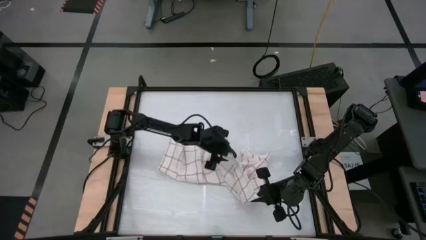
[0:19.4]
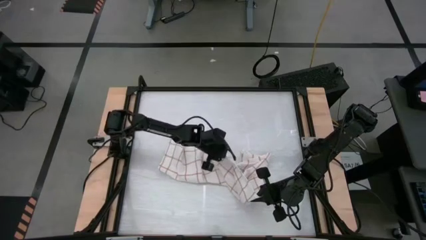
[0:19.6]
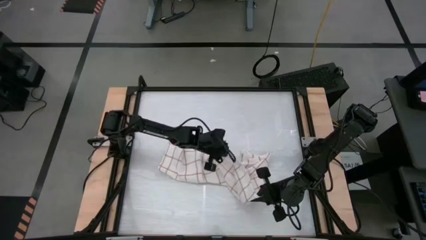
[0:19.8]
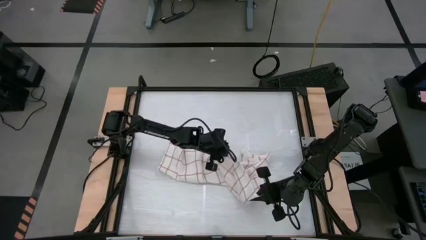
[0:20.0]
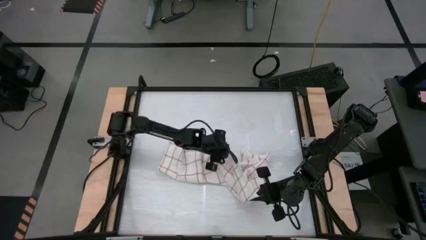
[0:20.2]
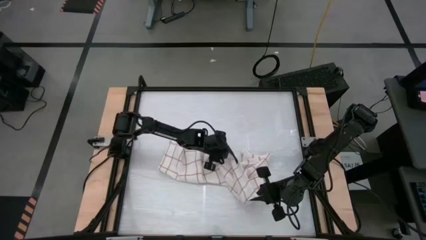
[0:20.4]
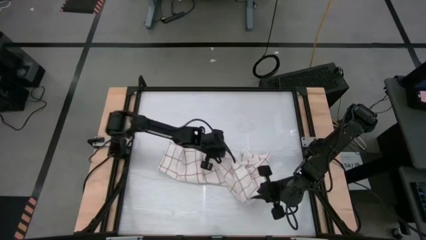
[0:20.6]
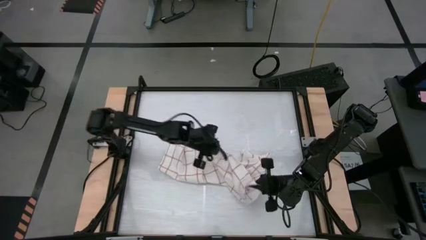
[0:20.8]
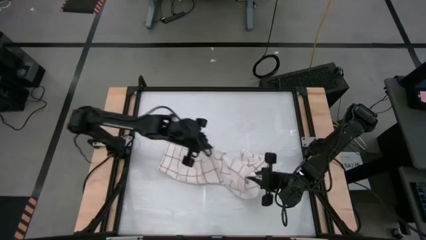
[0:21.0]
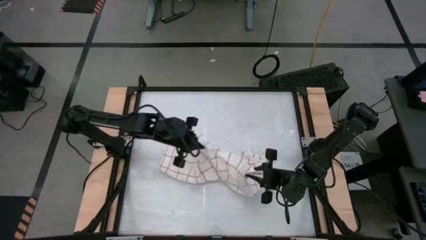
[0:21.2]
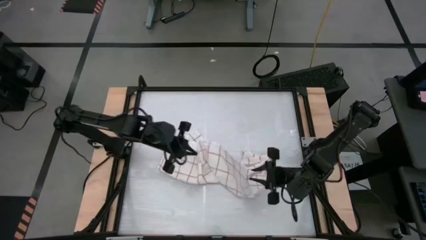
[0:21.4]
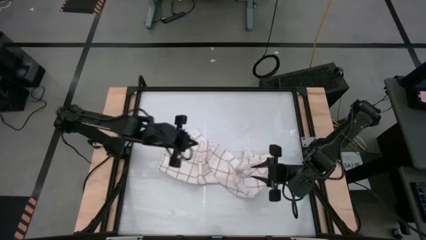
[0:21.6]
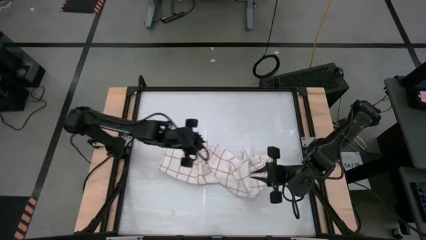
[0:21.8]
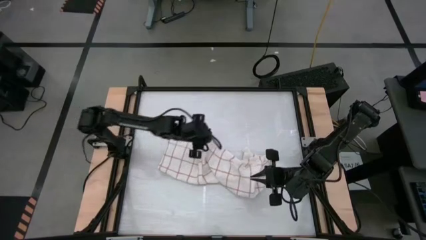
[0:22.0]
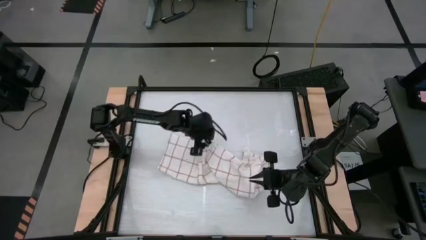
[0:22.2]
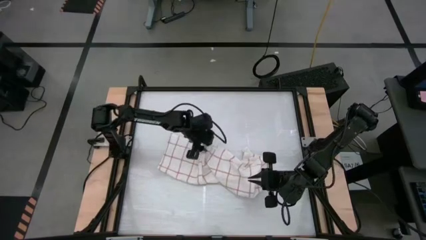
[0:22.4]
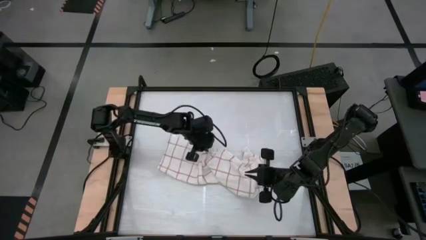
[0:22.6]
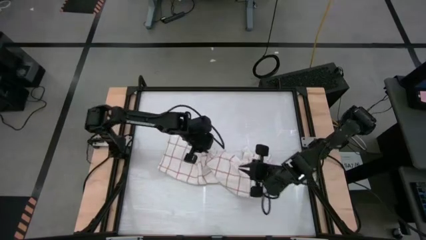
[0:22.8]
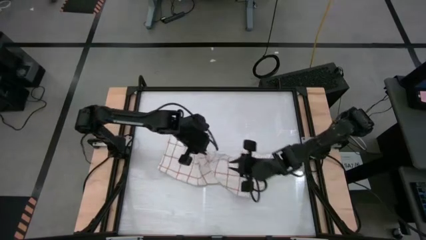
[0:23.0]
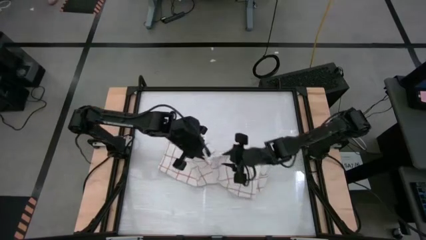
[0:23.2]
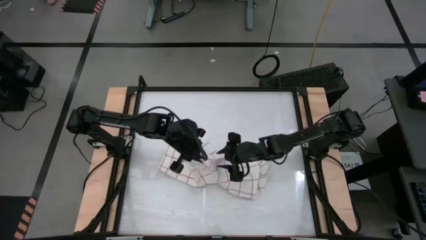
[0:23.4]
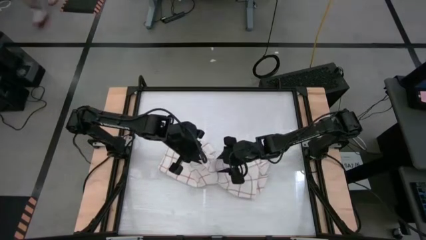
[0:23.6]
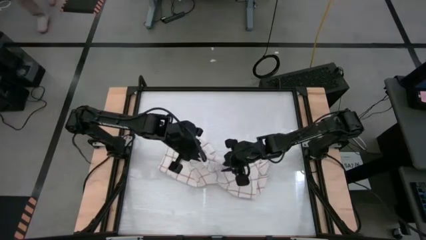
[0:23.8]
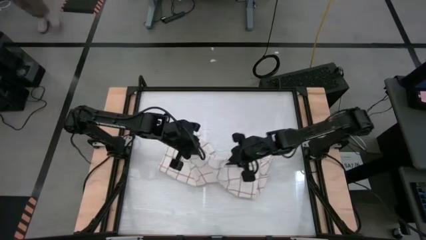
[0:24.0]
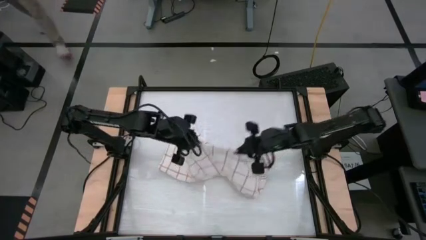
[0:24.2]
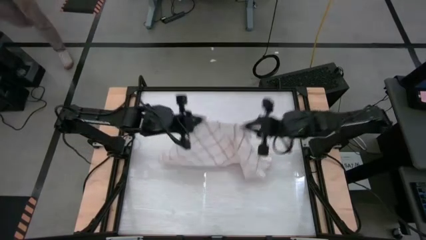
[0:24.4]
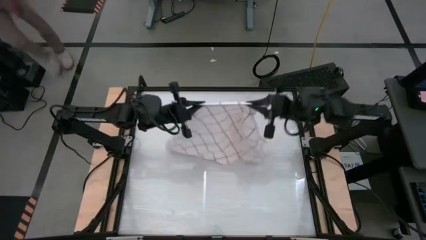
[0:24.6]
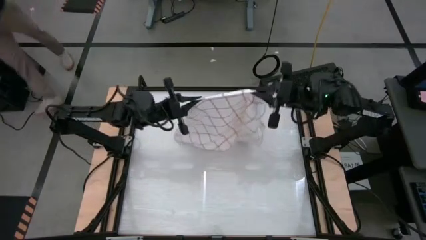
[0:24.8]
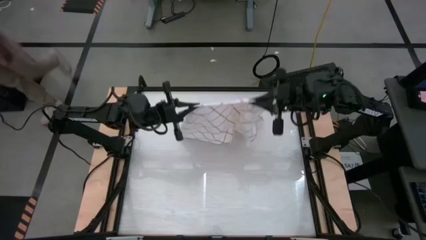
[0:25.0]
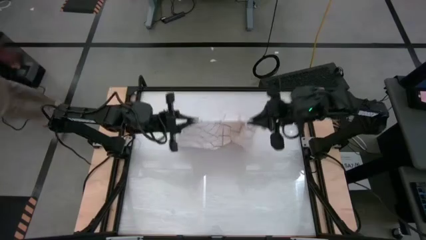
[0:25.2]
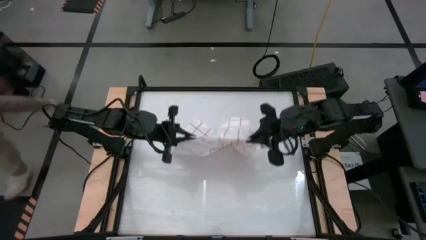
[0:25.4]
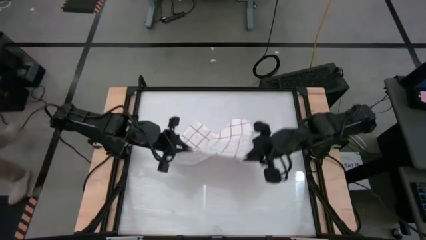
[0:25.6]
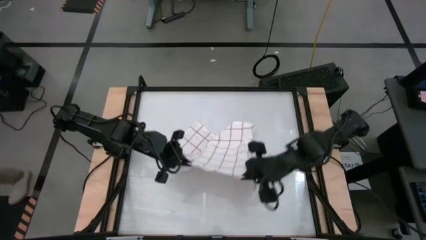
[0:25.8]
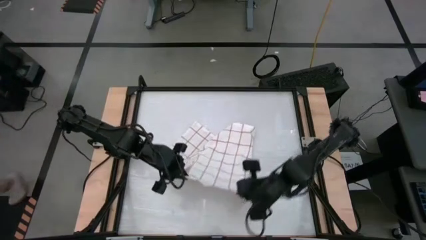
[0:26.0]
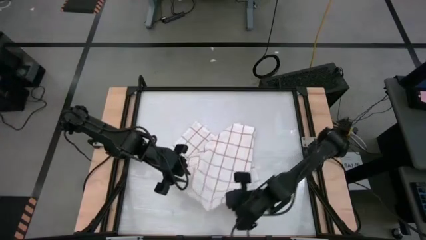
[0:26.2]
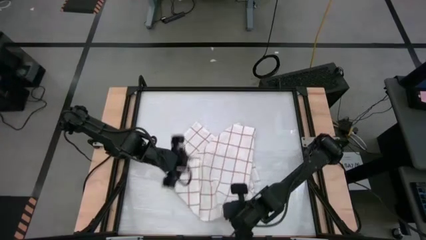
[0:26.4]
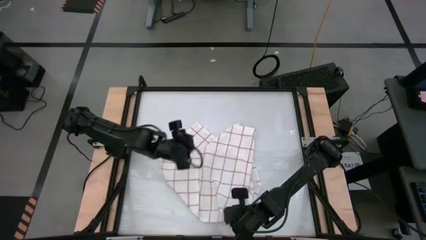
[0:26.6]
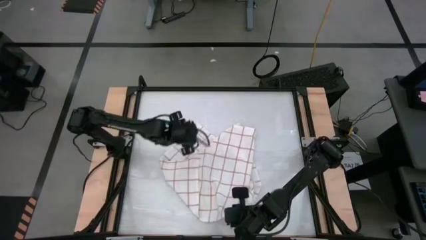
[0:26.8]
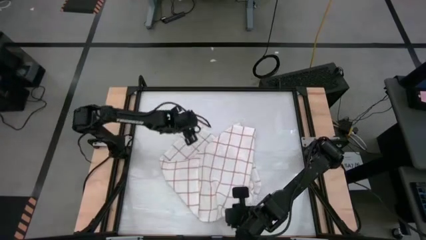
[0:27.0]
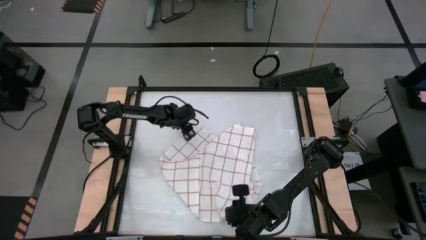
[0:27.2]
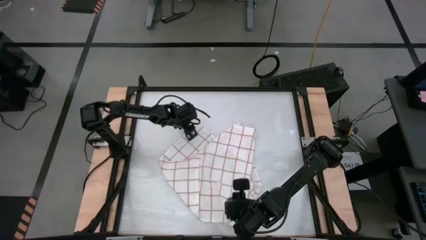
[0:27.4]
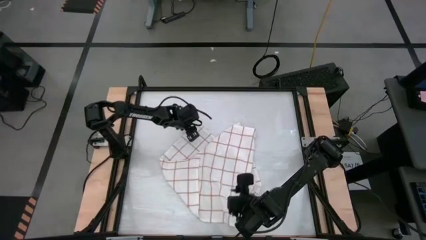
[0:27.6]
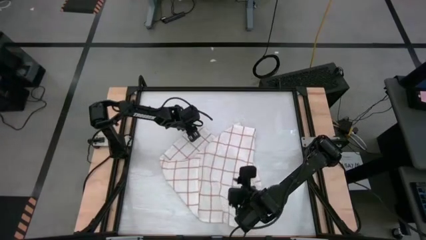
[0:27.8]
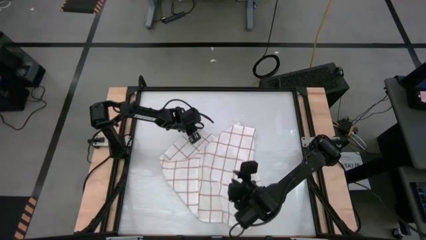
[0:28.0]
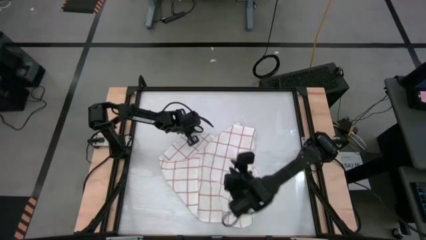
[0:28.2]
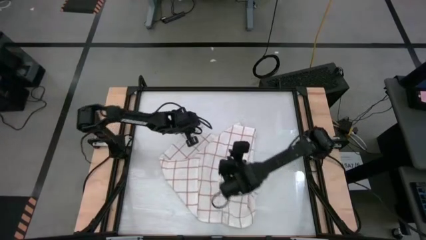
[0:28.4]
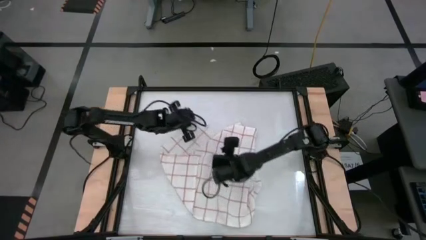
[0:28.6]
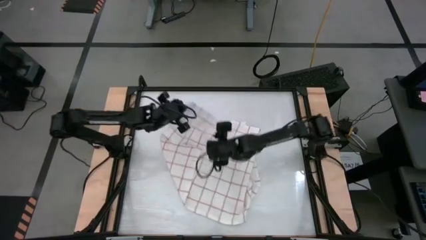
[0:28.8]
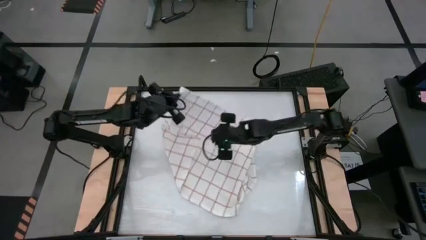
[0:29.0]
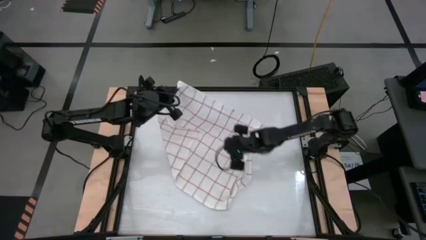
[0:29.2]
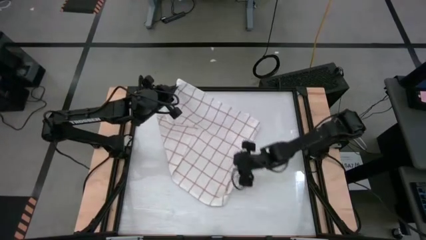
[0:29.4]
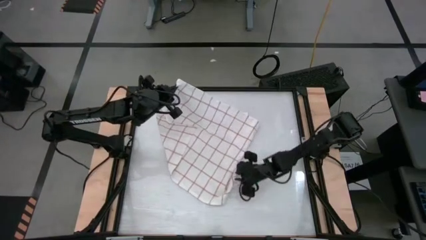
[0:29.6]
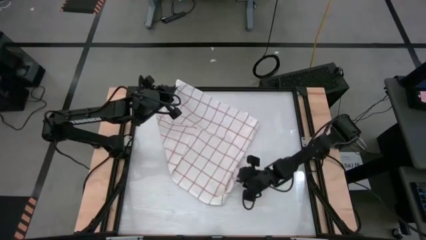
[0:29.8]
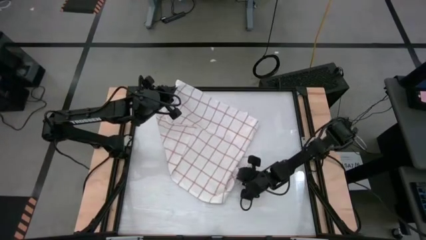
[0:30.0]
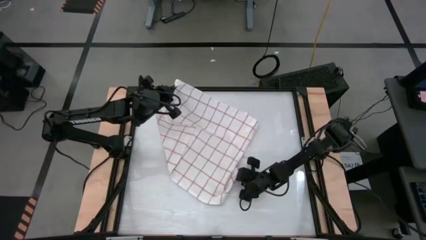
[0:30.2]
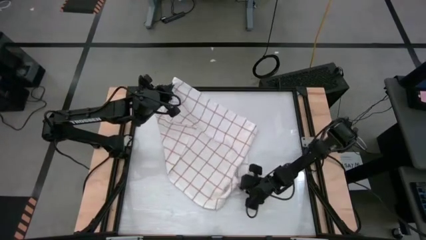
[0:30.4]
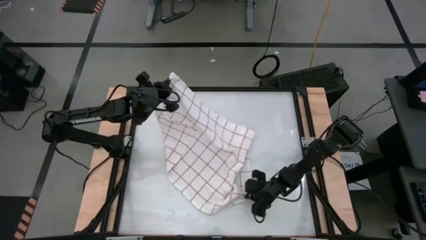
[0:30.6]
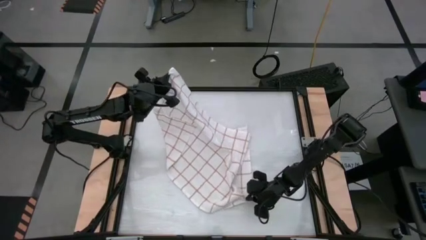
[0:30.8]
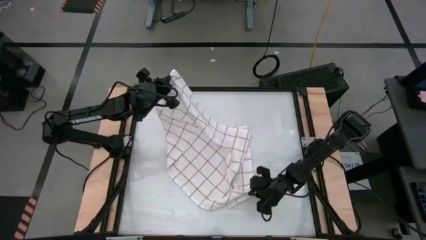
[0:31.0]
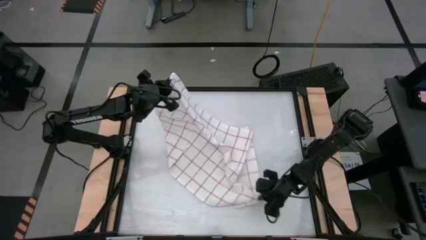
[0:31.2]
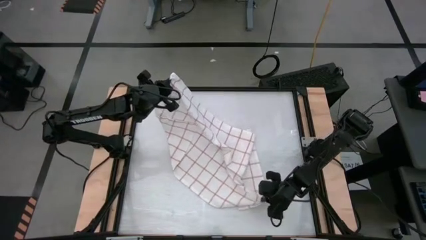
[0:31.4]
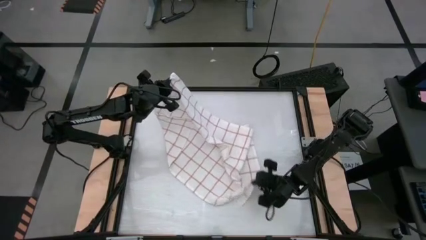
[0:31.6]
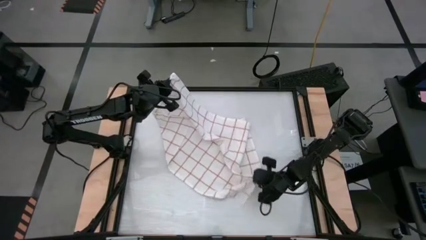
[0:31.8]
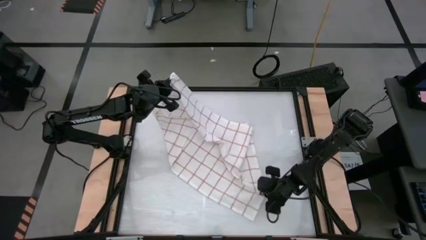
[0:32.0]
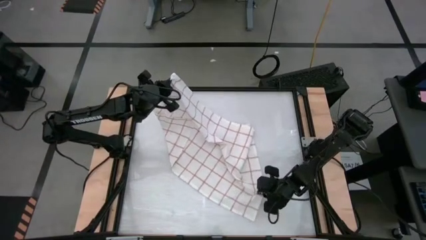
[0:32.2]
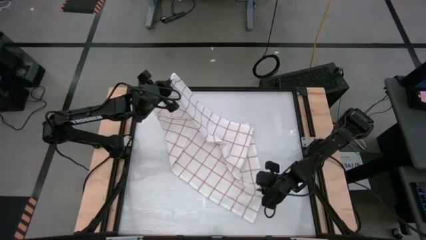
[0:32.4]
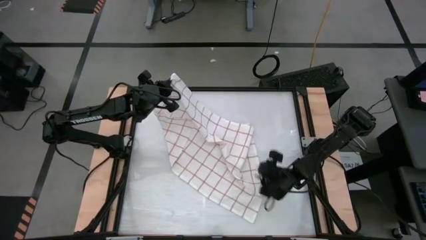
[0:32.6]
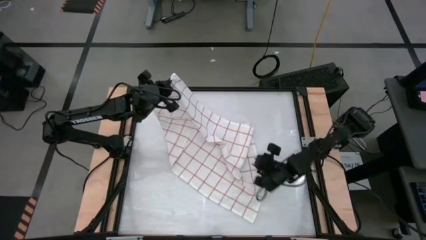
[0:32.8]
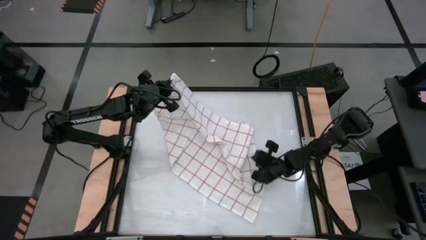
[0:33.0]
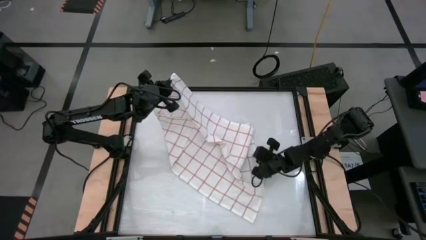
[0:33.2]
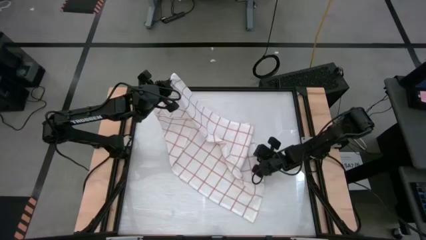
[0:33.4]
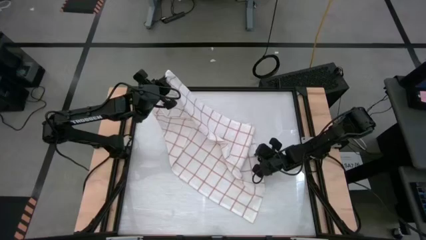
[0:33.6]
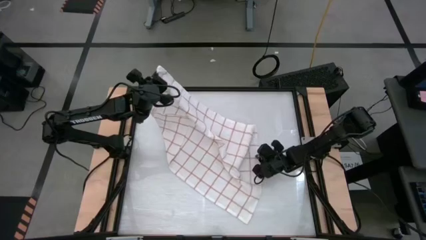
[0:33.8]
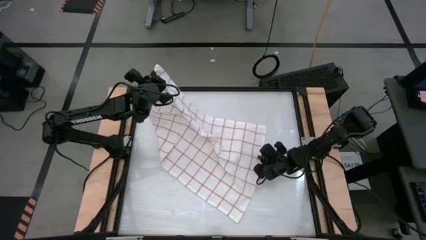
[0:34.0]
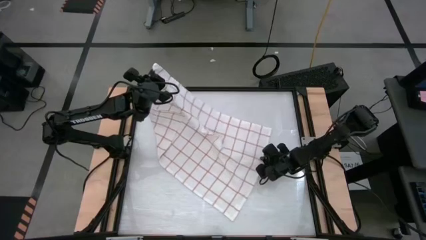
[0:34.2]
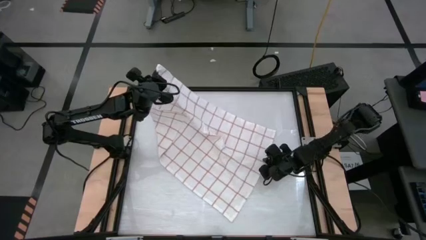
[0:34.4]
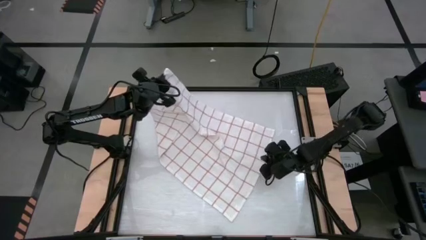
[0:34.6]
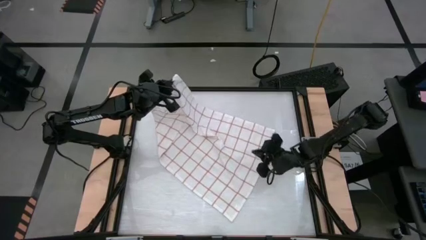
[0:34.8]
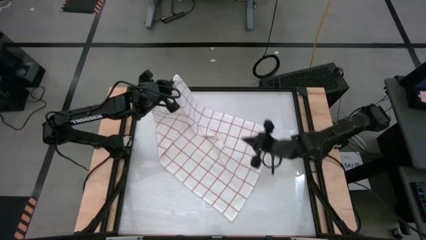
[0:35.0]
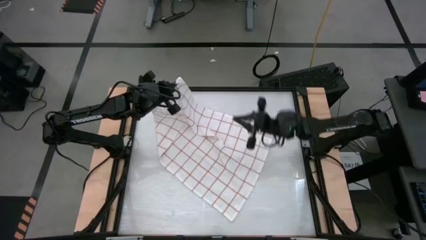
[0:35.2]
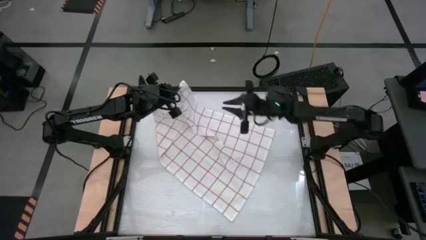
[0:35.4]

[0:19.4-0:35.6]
Task: Roll towel
Fold the white checkered towel
